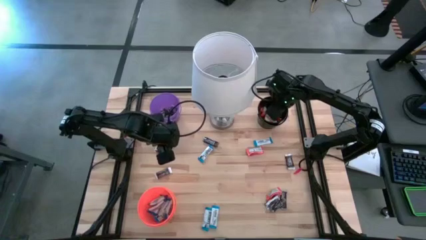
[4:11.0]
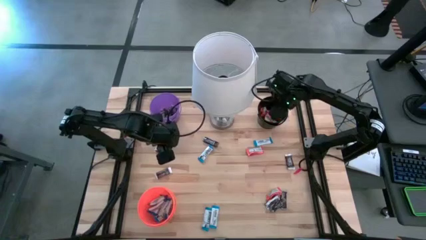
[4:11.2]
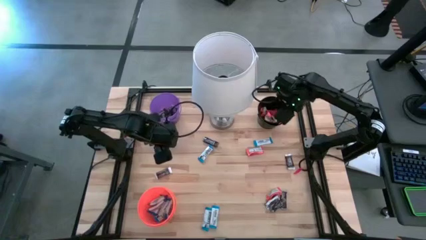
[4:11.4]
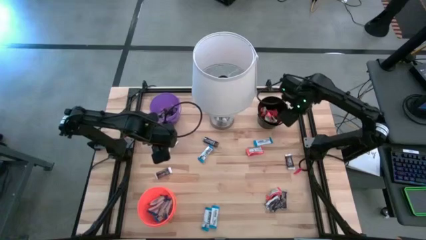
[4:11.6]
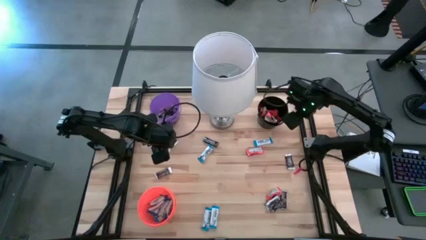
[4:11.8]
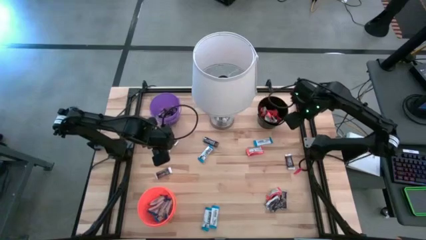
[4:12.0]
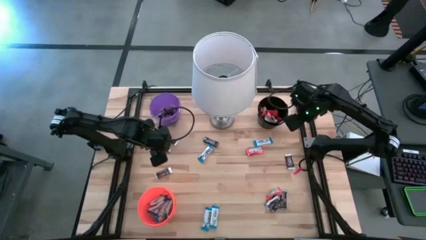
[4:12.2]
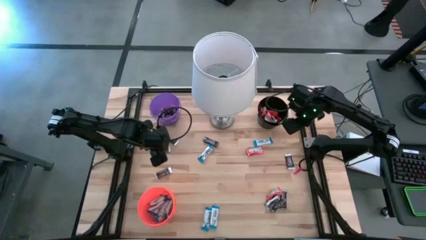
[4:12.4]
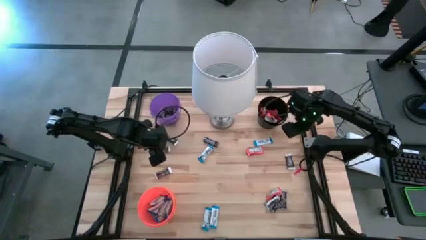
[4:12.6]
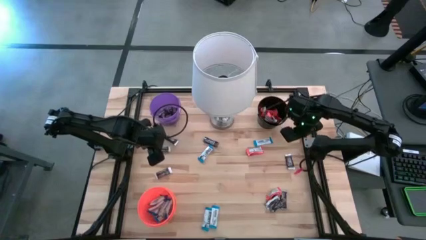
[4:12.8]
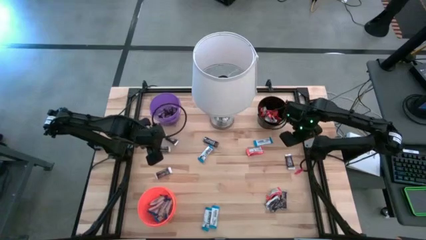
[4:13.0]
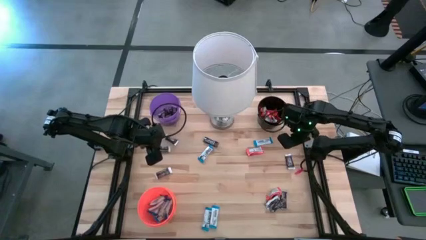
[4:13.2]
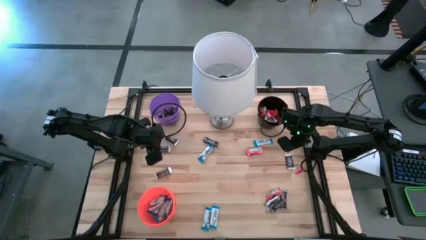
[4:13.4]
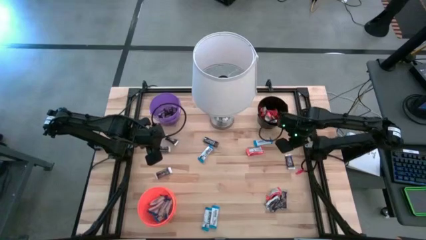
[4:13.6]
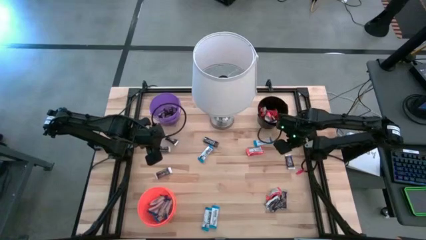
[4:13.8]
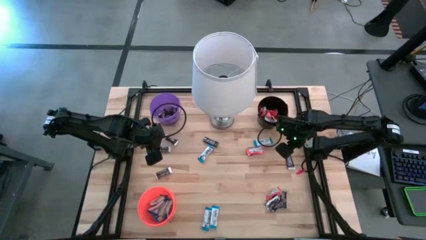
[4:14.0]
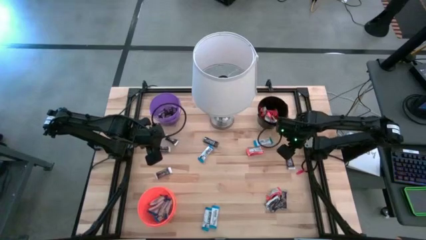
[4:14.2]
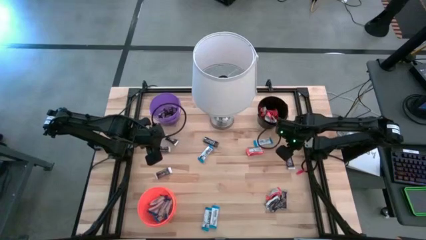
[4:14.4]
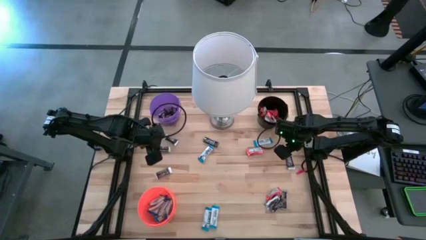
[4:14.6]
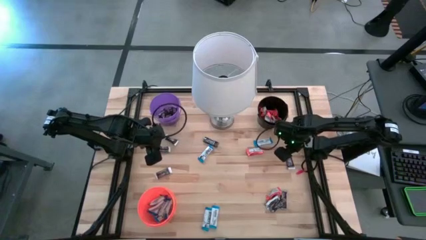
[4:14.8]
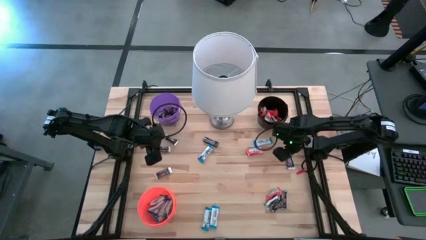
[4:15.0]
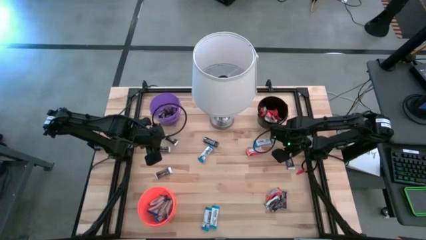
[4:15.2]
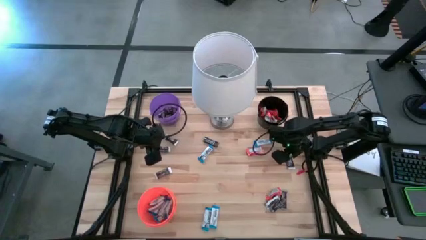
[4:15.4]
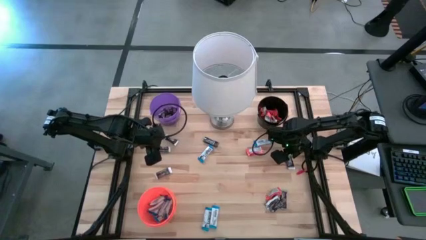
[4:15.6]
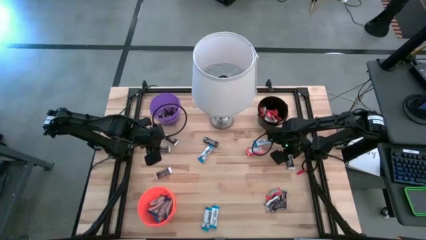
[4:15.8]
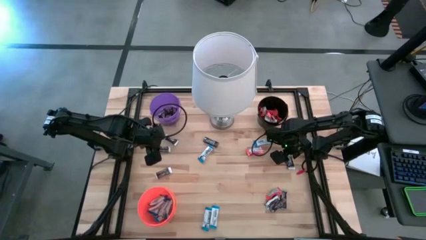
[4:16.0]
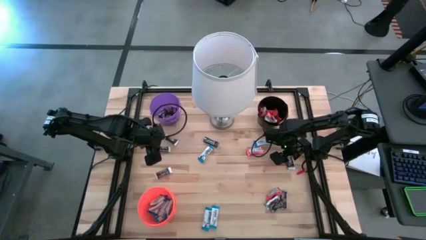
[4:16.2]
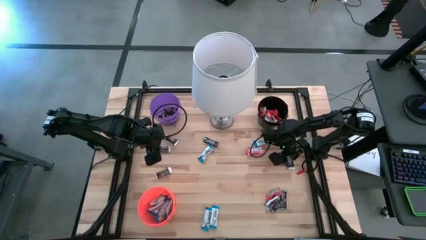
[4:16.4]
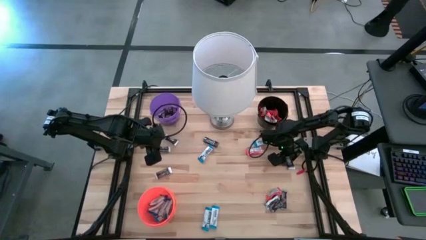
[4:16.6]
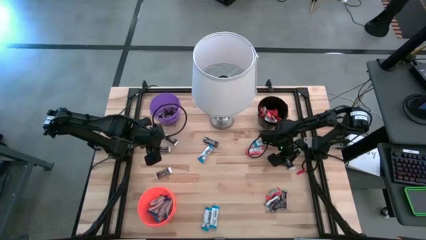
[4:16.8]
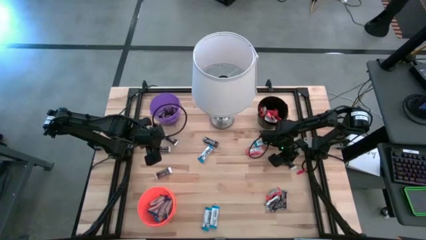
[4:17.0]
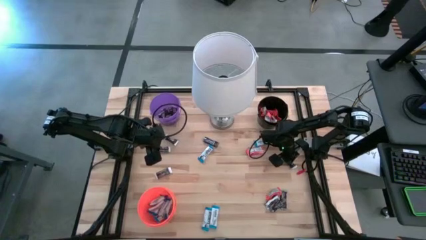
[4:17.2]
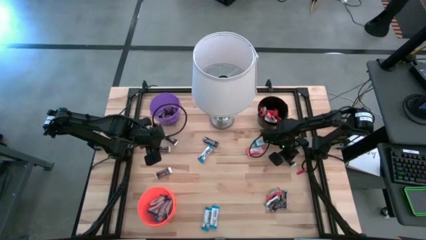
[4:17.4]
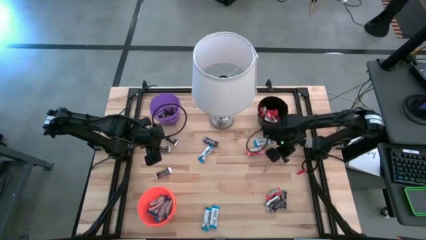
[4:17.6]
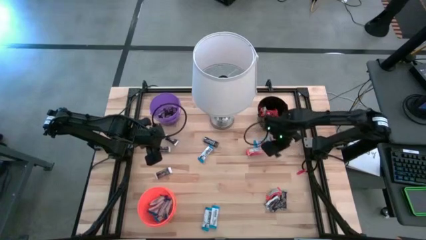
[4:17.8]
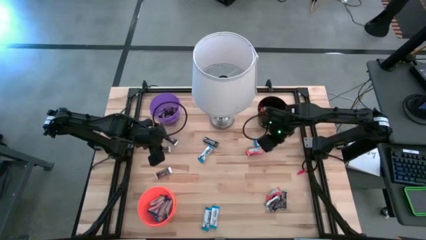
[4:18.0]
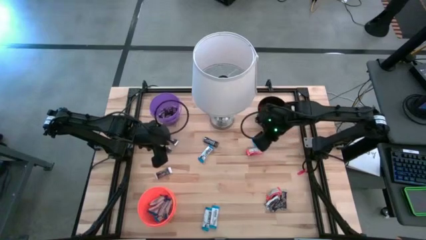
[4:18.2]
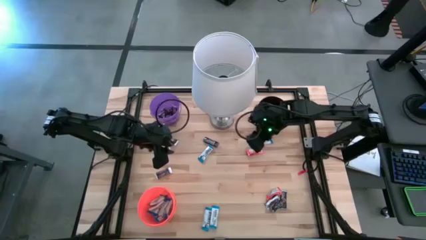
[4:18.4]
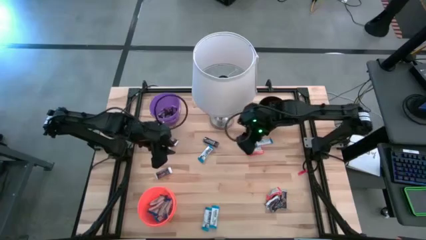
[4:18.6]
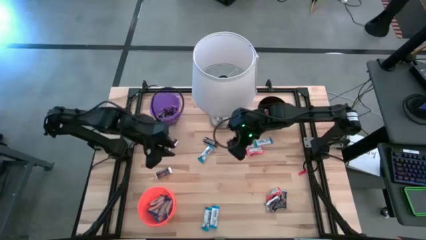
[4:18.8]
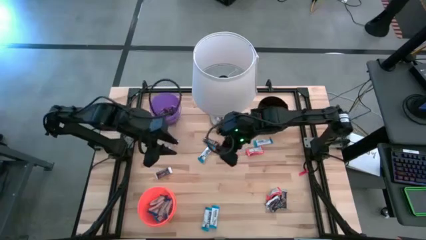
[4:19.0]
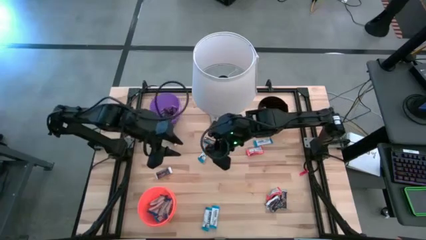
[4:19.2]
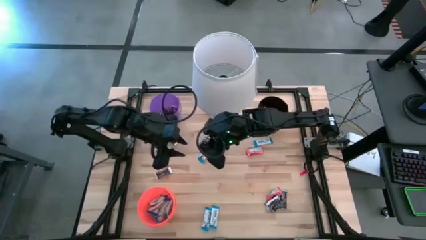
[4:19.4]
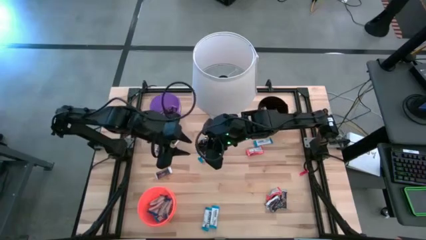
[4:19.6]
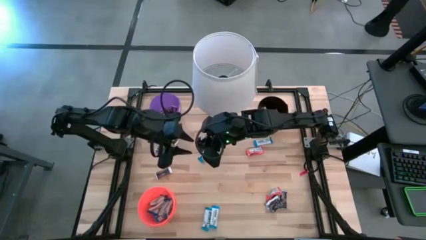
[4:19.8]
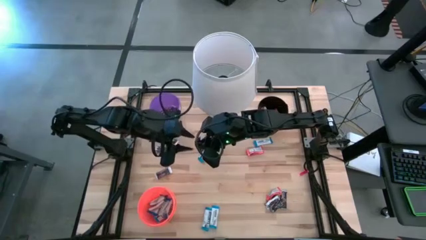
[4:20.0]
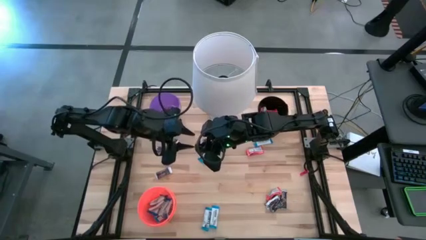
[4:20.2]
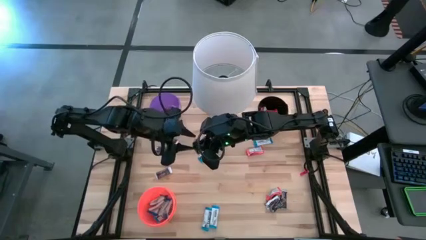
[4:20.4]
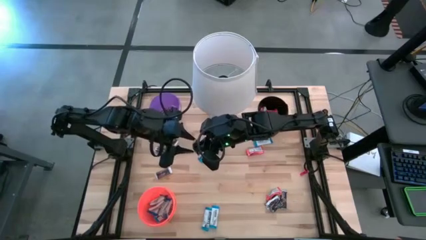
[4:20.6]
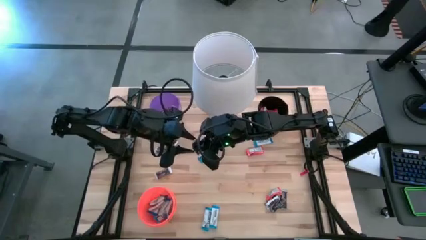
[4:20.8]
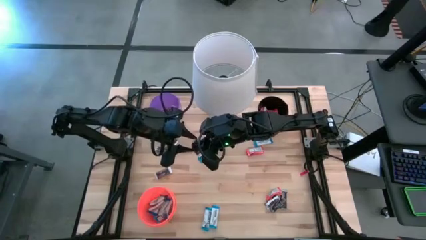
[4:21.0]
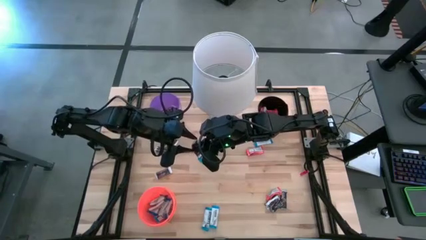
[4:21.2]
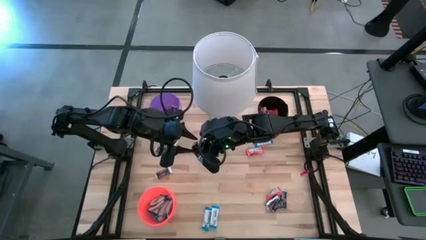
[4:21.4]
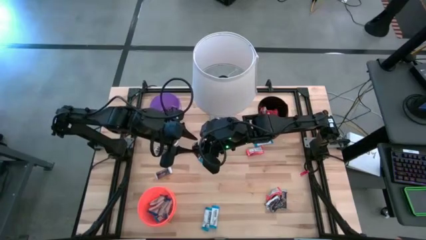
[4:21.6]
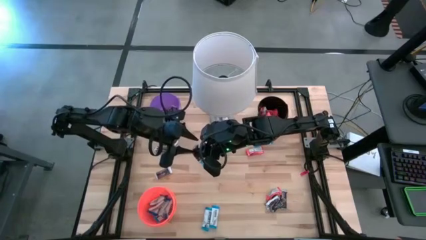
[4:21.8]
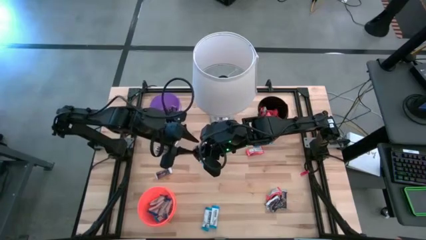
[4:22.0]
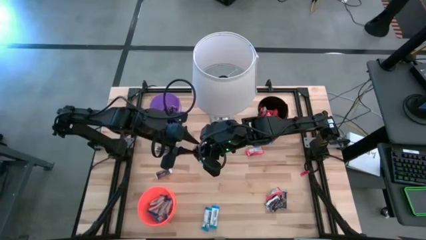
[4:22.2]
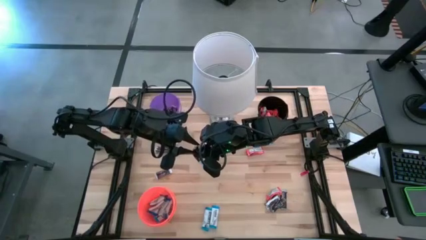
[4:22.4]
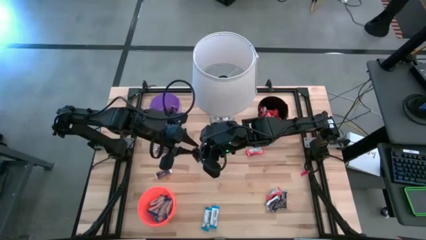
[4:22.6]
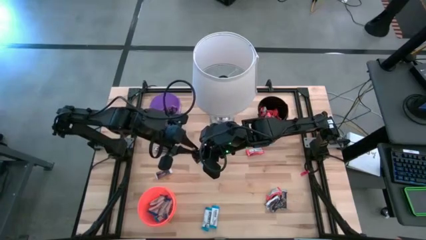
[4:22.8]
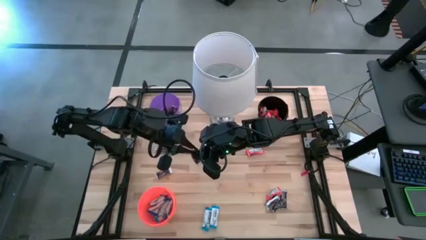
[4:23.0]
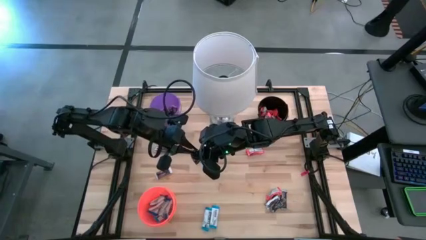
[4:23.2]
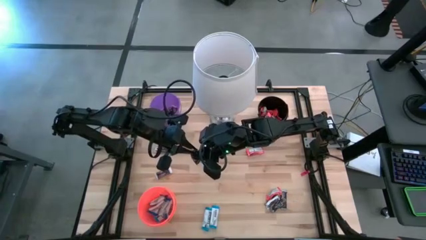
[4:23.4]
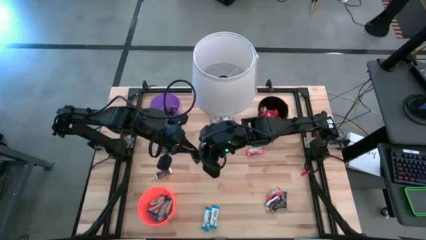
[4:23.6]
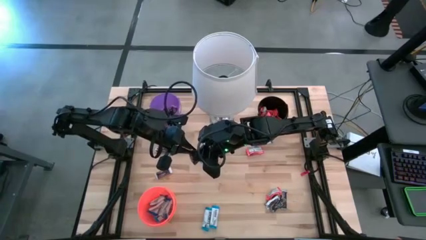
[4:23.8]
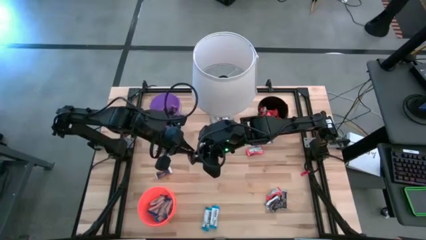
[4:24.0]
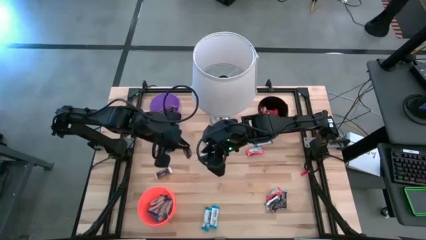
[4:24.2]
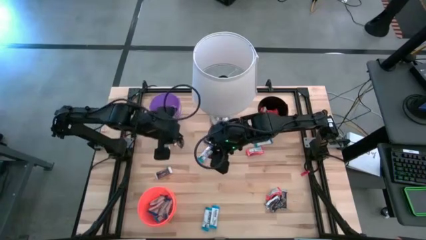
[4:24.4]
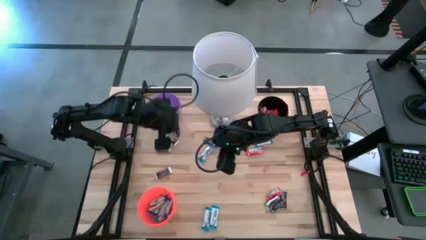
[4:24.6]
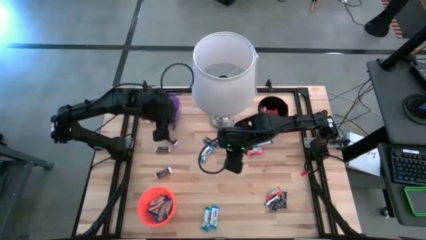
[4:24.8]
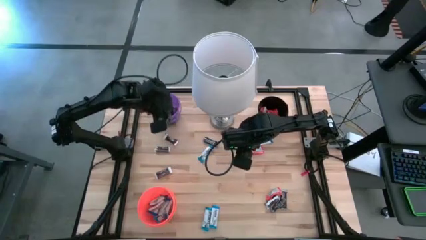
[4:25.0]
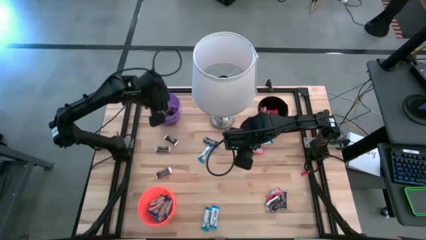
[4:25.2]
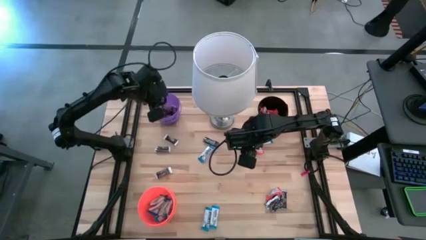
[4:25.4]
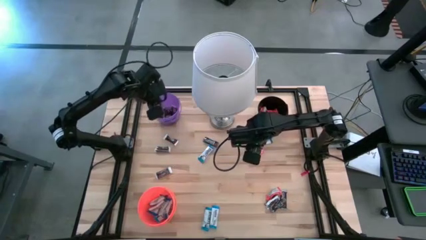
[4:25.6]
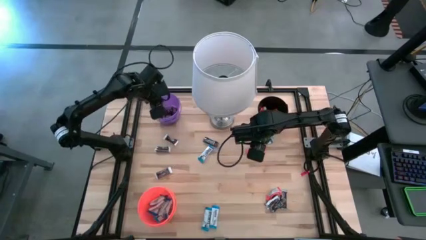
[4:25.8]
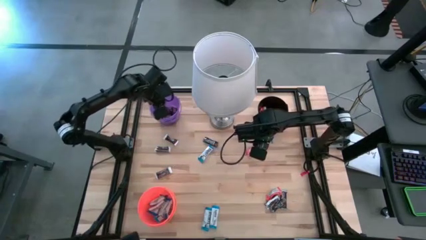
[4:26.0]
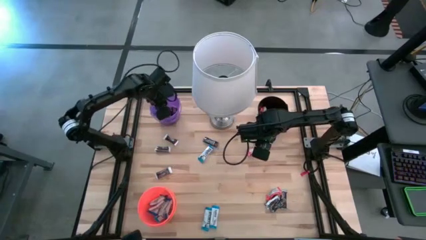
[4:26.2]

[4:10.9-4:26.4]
Task: Organize candy in baskets
Put the brown chocolate bar into the purple bucket

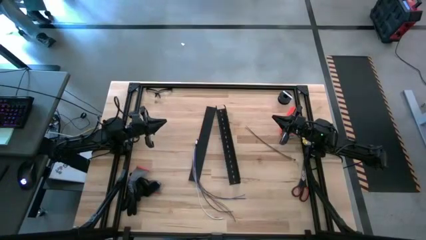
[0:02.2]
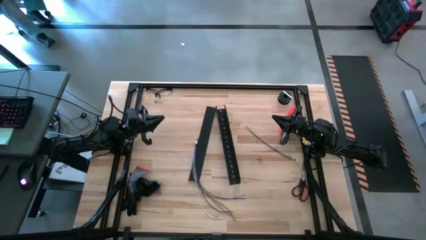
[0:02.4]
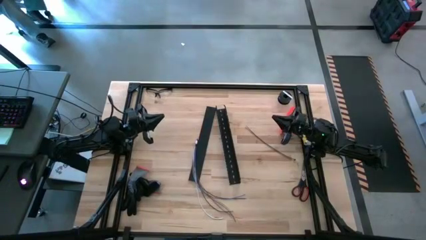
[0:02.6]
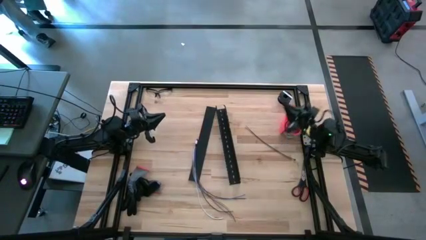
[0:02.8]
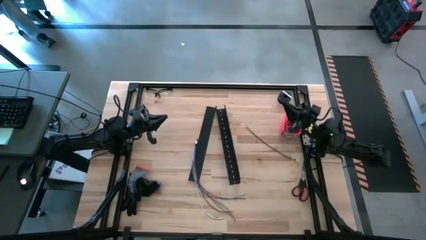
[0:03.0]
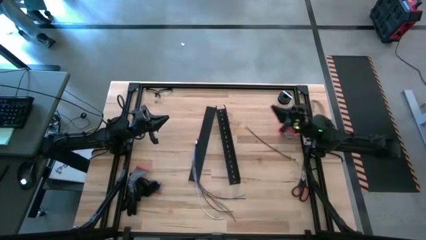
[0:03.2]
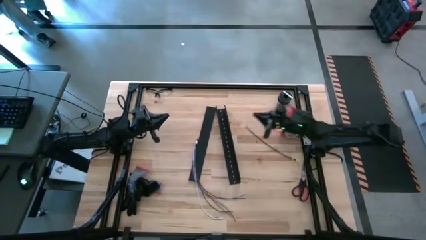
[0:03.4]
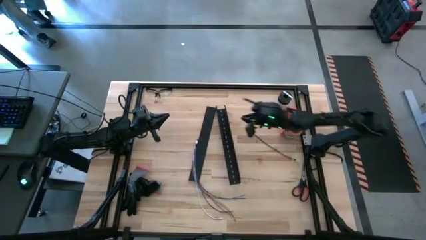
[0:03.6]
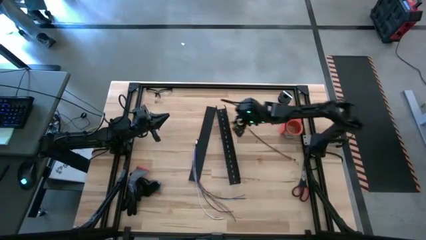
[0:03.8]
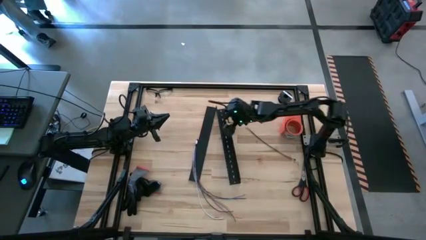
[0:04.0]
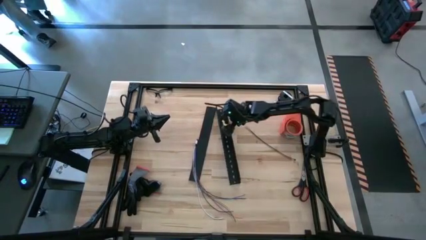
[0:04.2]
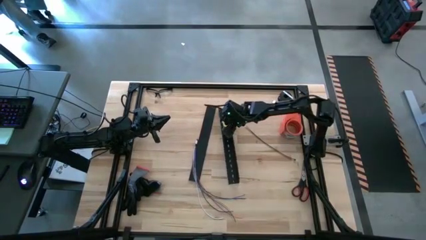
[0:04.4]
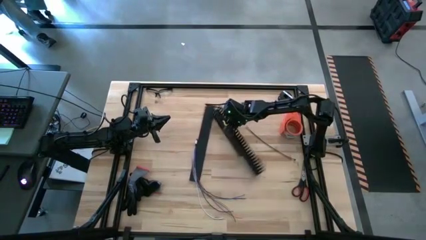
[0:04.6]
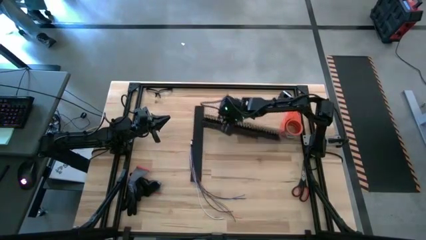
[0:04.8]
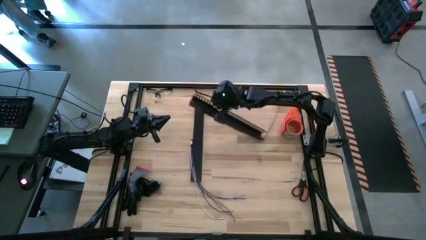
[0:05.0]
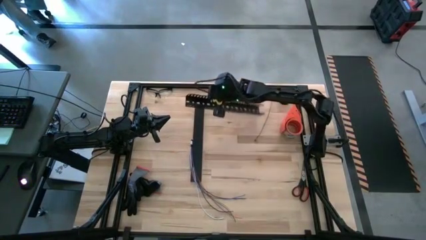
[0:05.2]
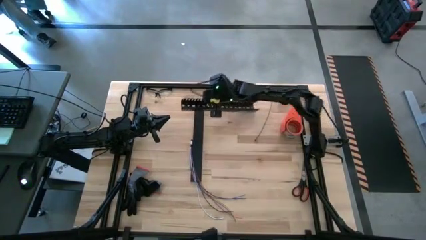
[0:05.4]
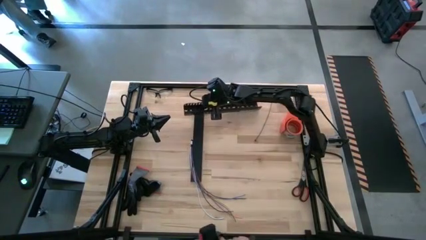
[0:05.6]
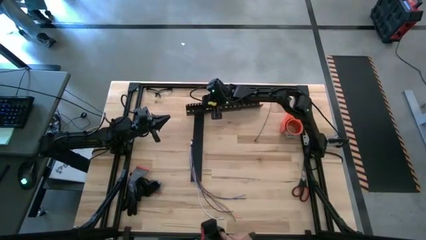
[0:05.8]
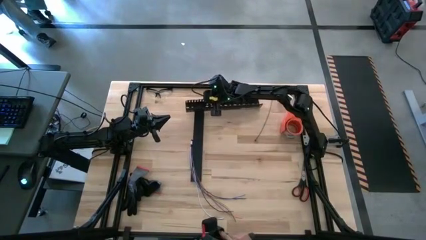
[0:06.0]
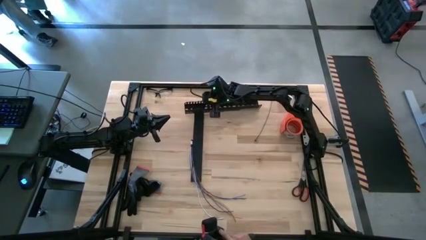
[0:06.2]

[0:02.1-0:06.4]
Task: Ziptie cables
Move the cable duct to the top center of the table
